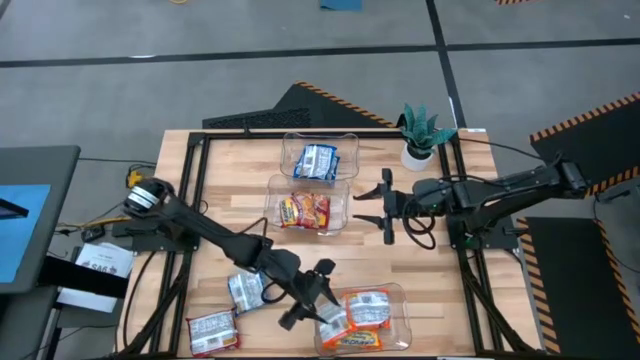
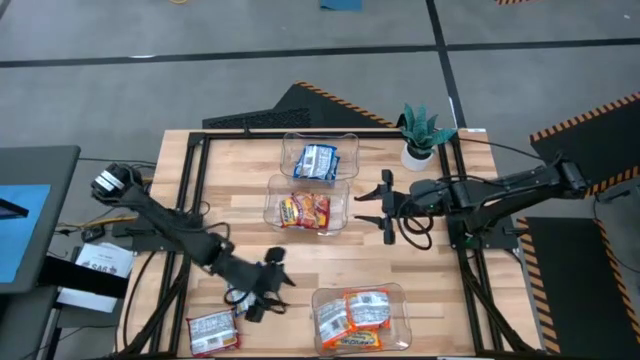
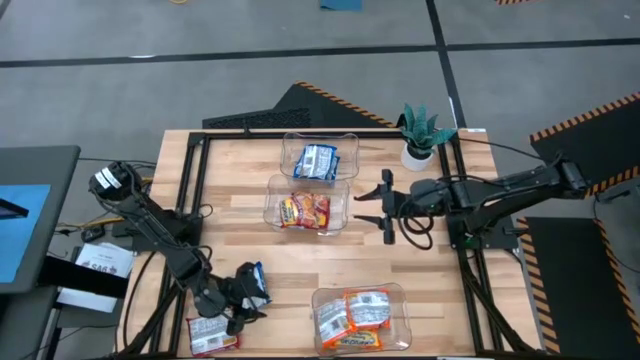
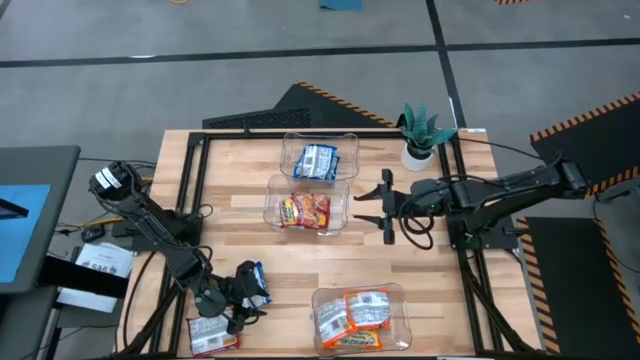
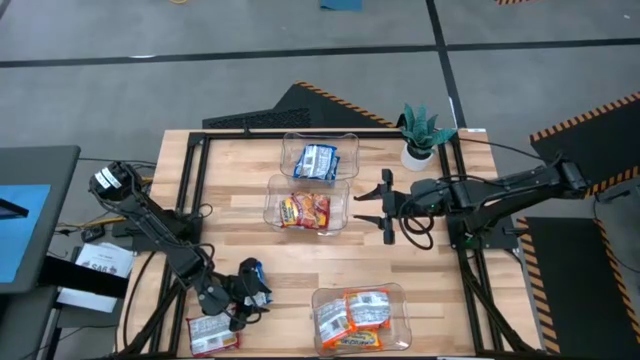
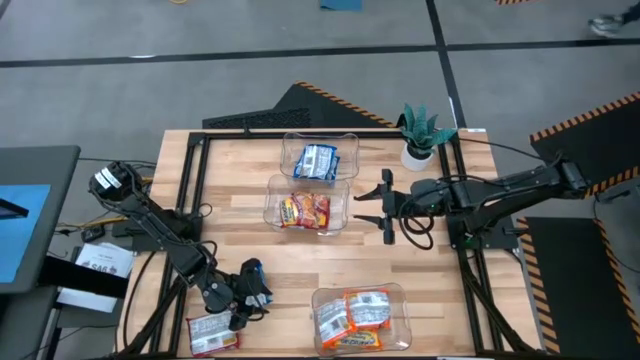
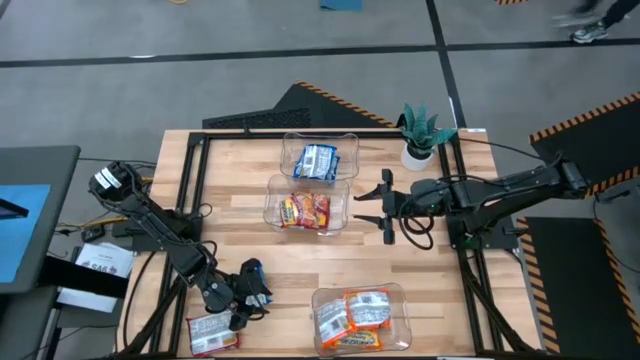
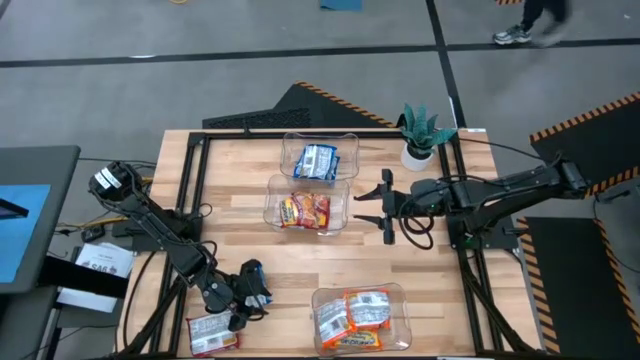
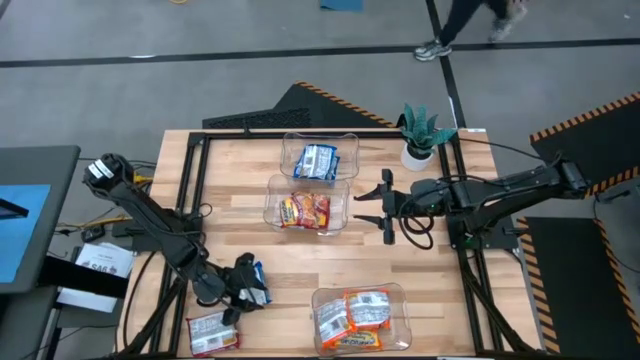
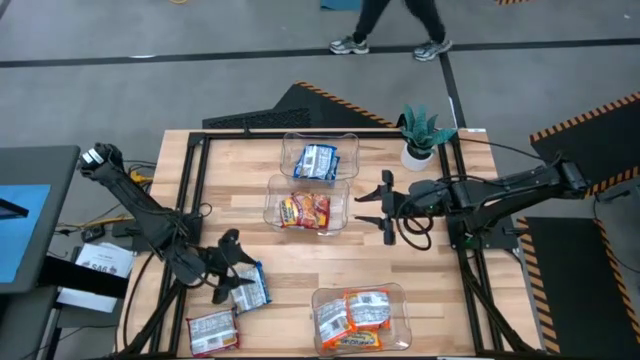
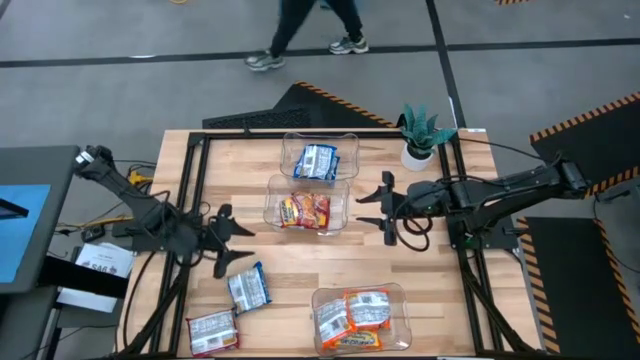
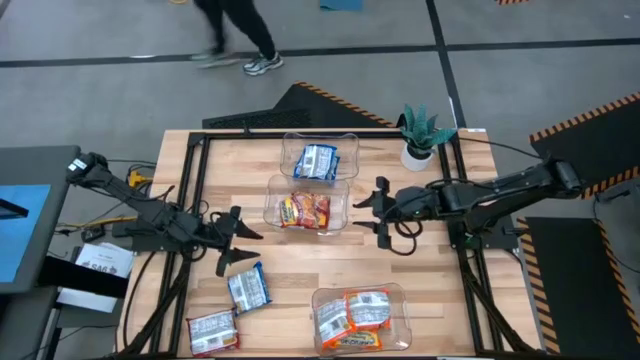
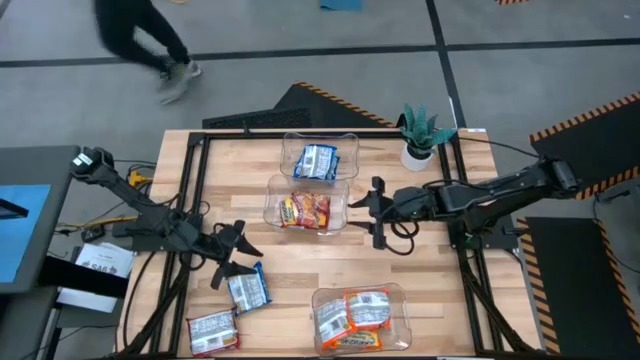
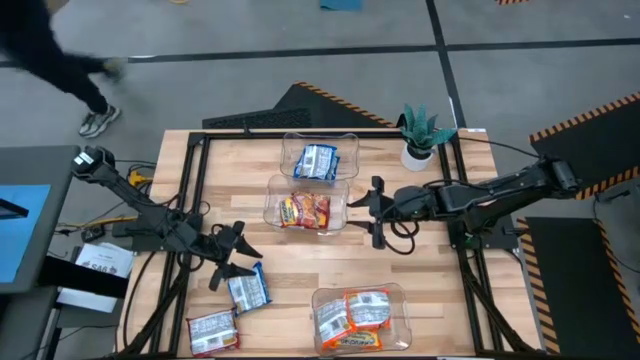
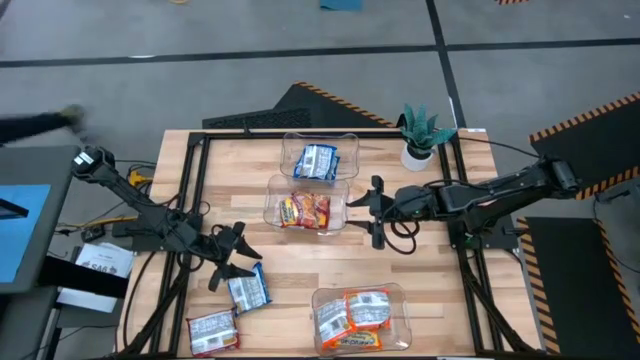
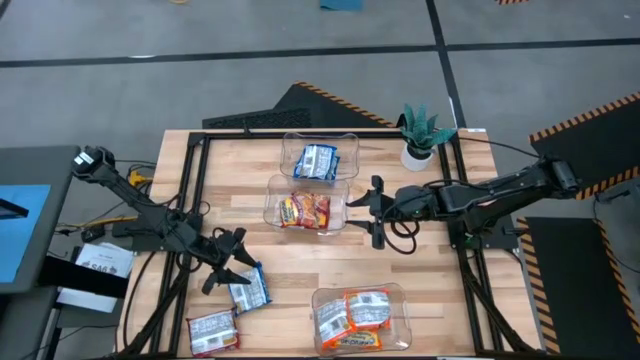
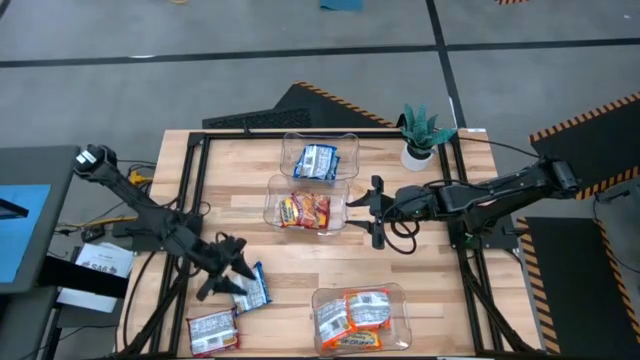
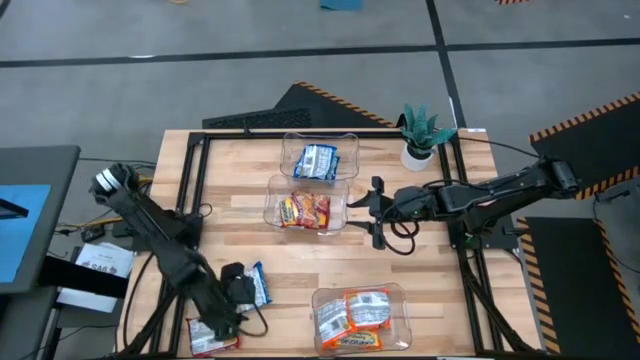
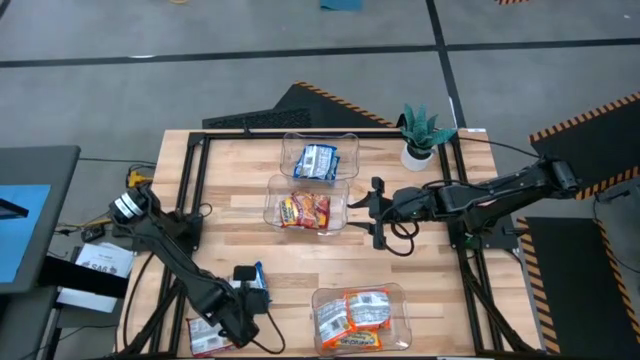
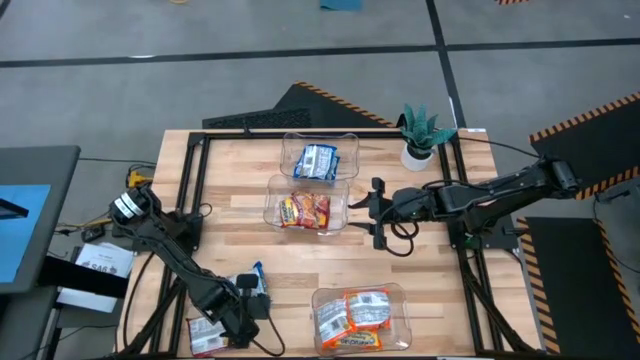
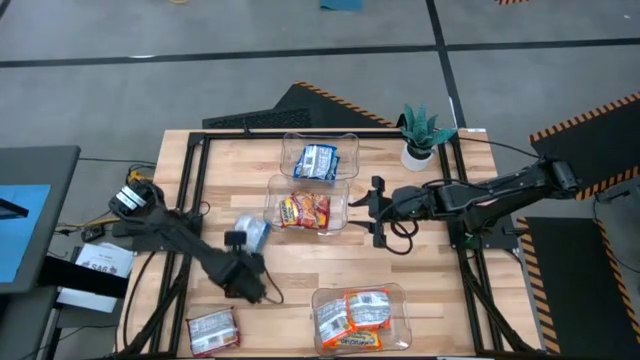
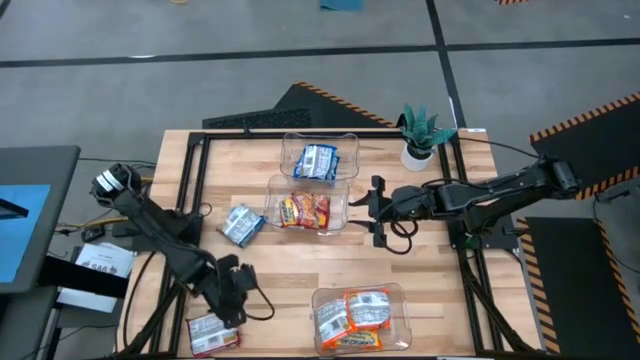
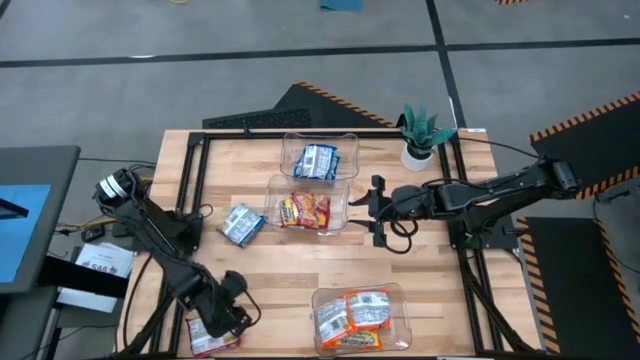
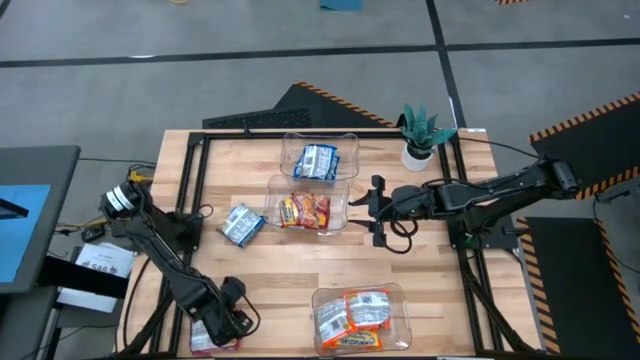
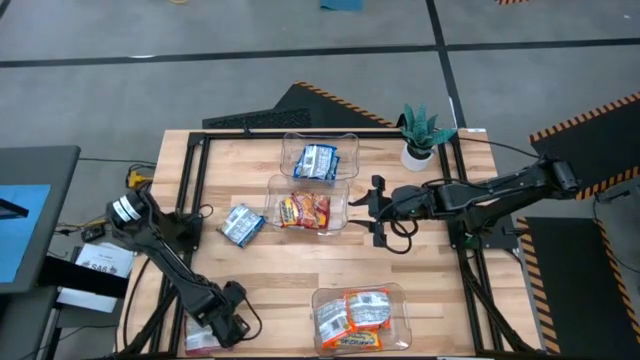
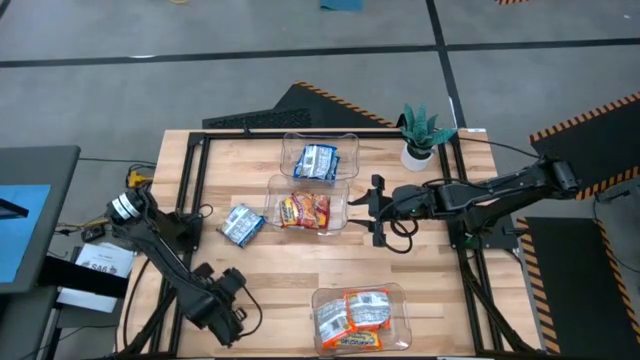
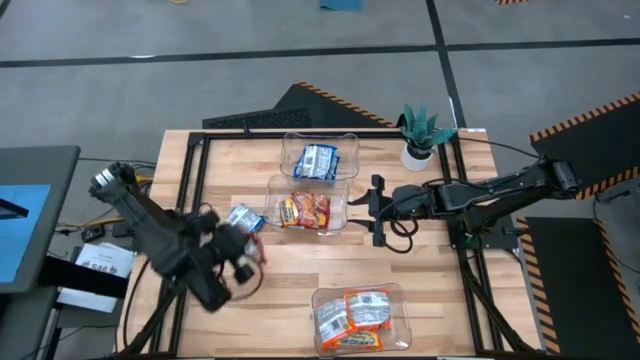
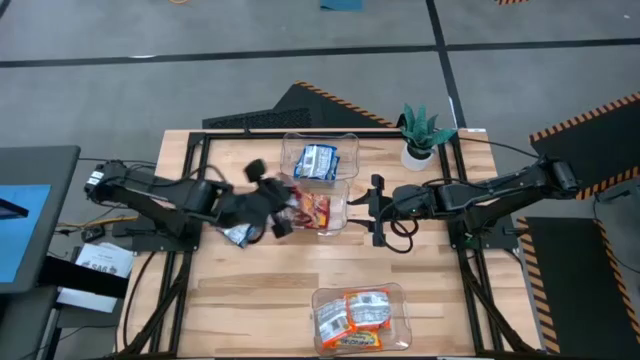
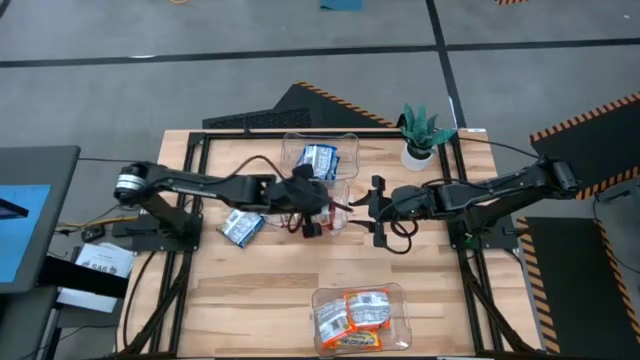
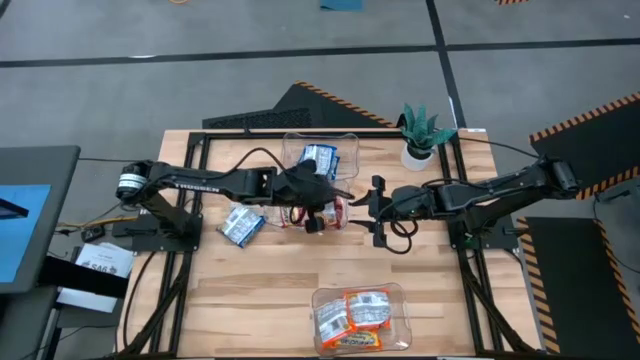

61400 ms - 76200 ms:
Task: Sort Maruchan noodles
Put the red noodle pack into the middle transparent bin

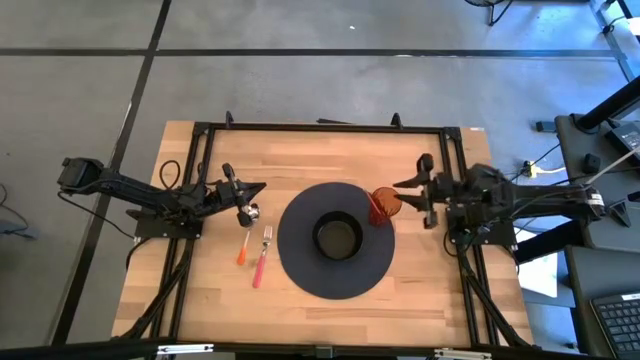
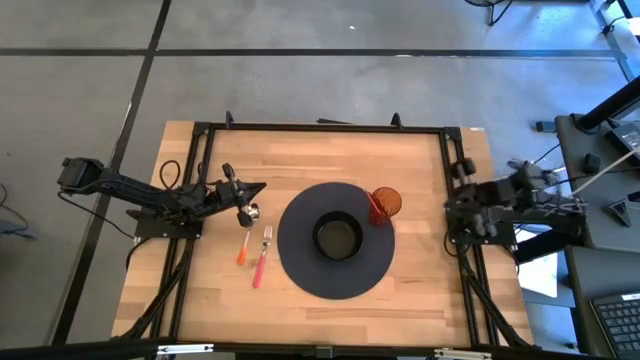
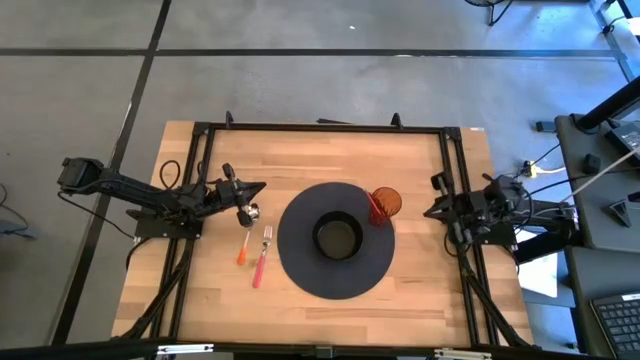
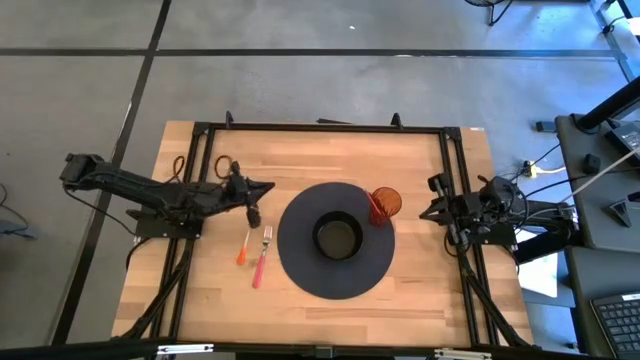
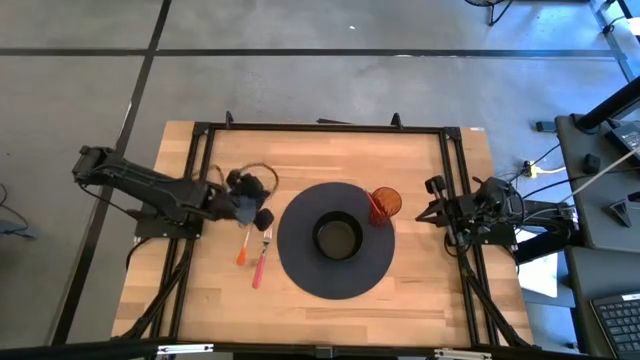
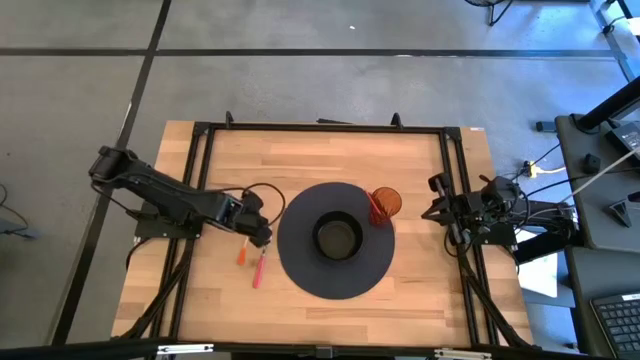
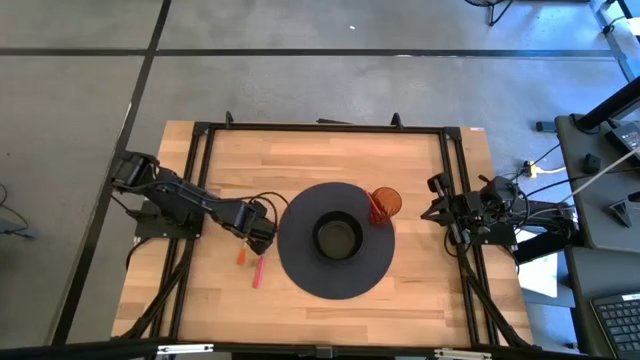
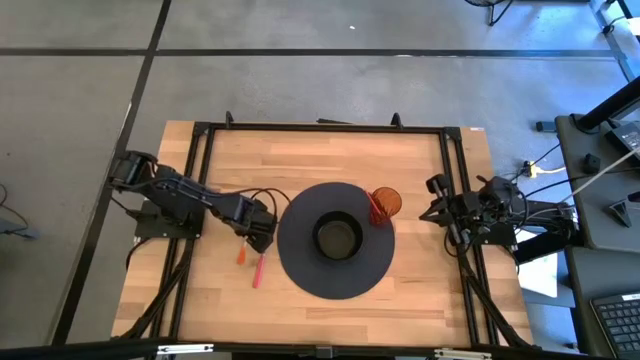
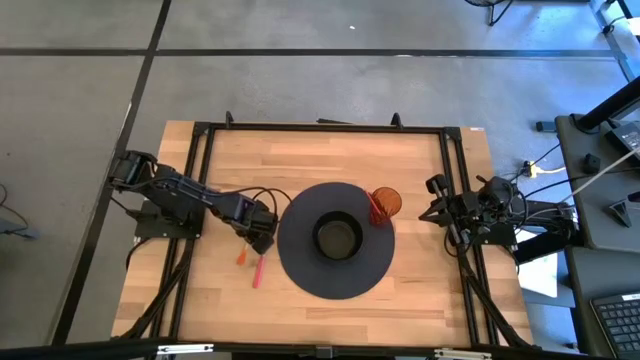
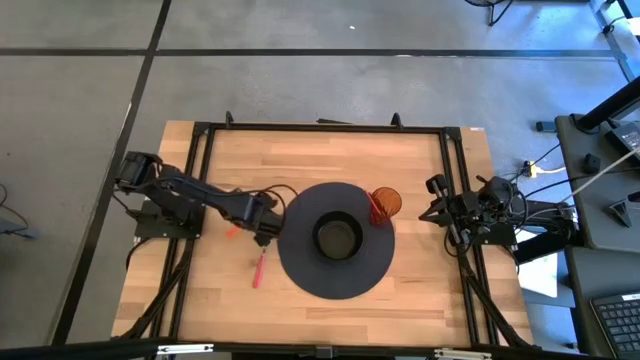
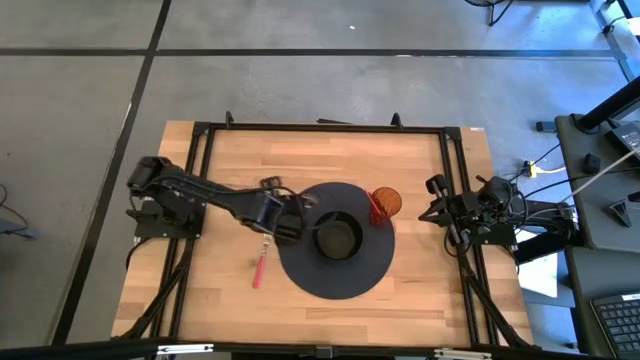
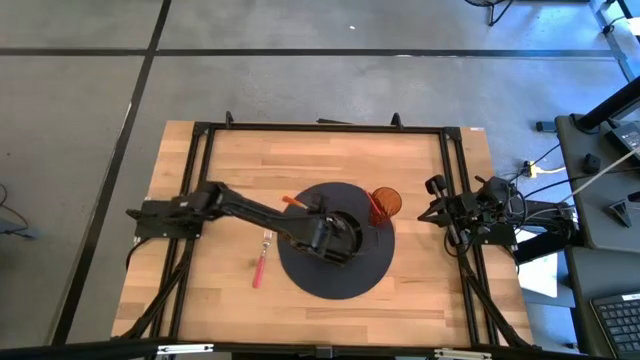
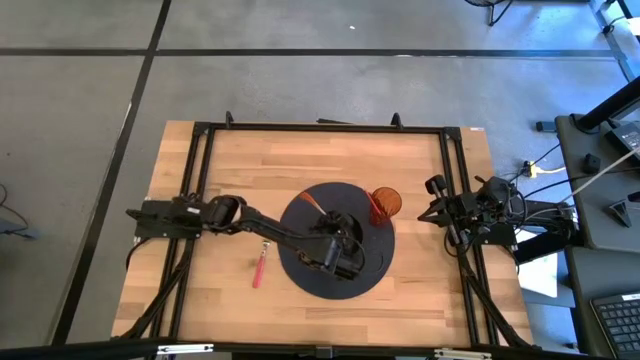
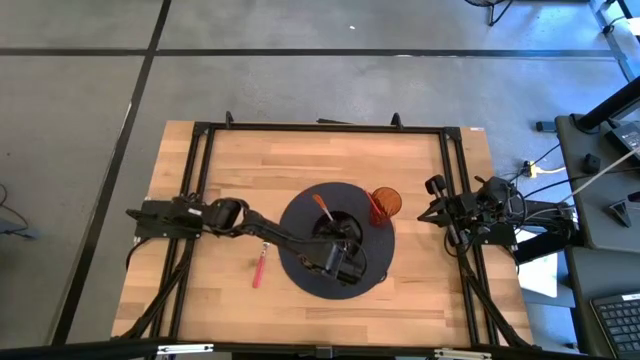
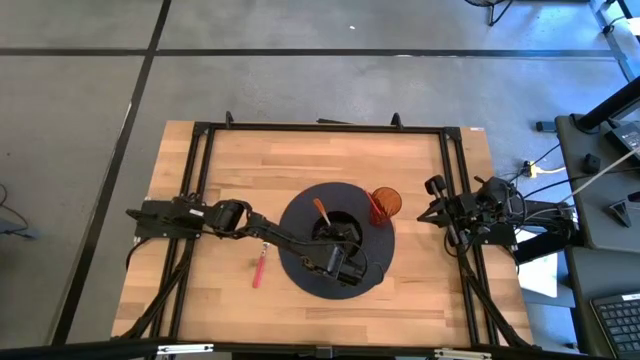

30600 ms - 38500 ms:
Task: Pick & Place Utensil
Put the orange spoon into the black bowl on the black mat
